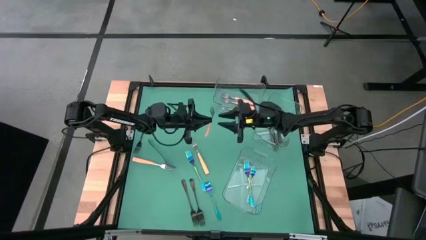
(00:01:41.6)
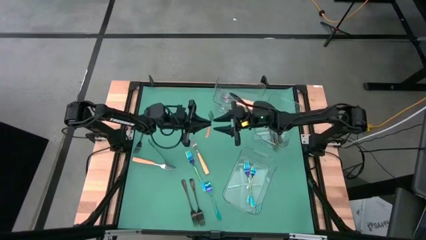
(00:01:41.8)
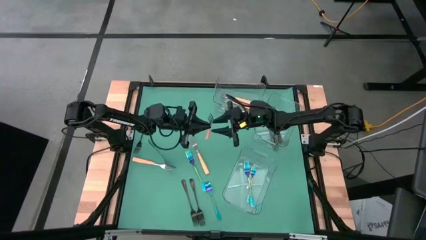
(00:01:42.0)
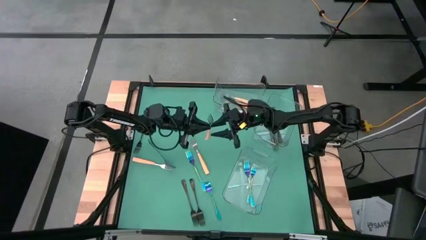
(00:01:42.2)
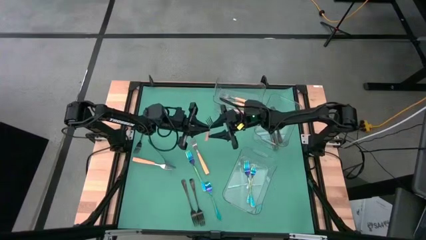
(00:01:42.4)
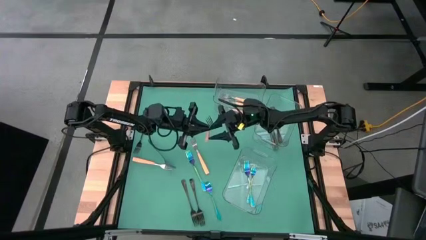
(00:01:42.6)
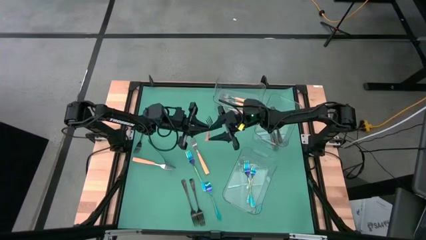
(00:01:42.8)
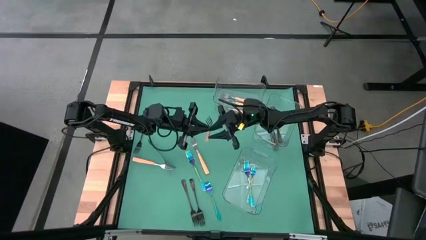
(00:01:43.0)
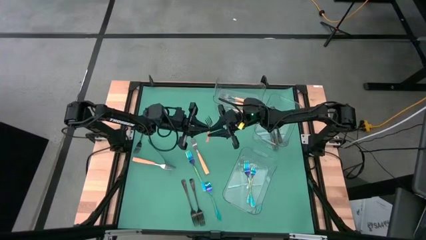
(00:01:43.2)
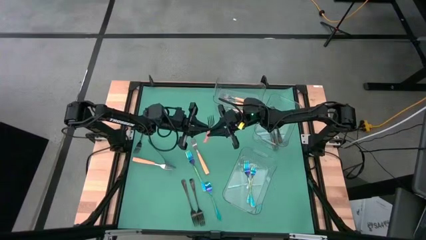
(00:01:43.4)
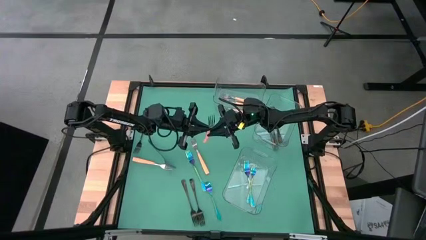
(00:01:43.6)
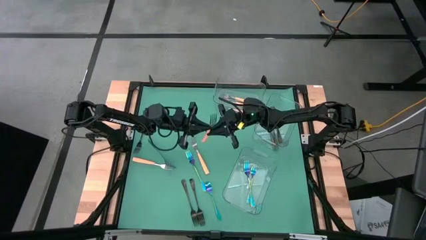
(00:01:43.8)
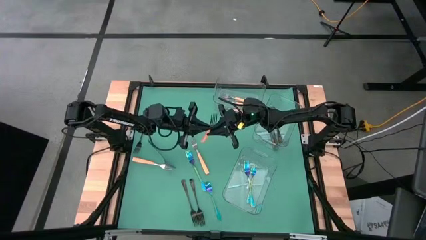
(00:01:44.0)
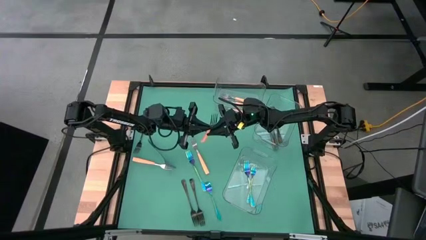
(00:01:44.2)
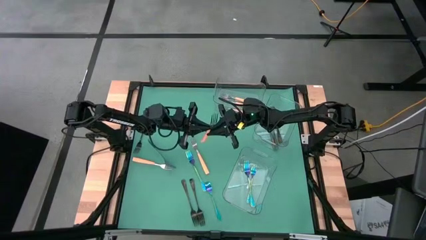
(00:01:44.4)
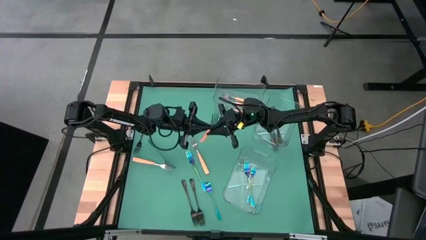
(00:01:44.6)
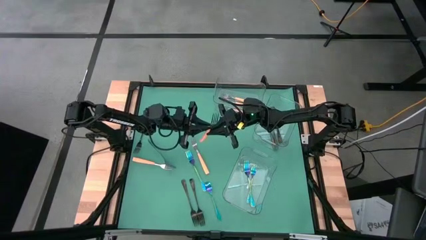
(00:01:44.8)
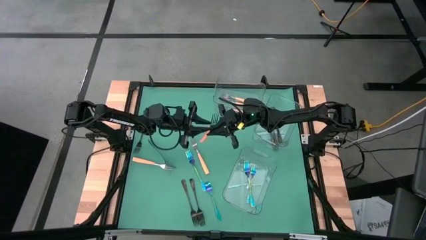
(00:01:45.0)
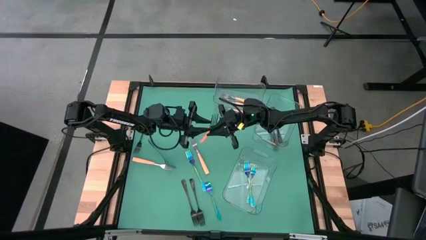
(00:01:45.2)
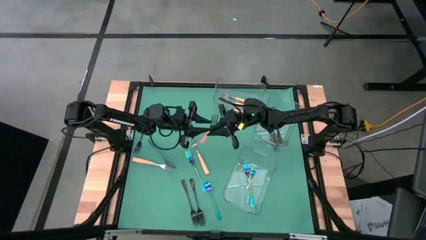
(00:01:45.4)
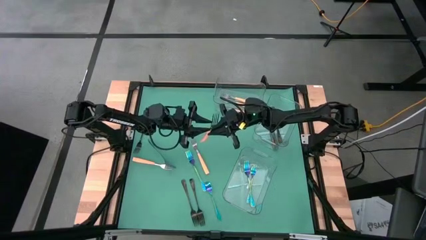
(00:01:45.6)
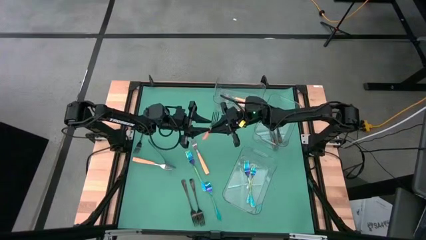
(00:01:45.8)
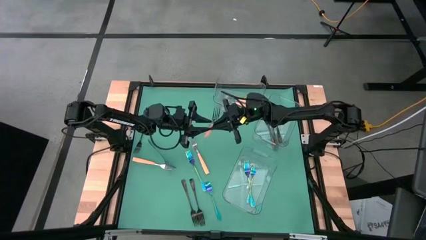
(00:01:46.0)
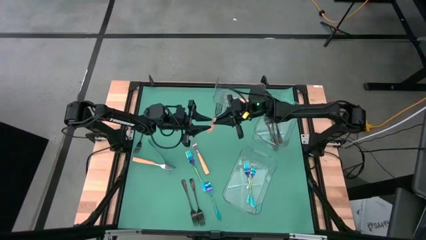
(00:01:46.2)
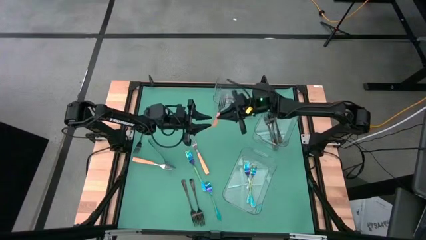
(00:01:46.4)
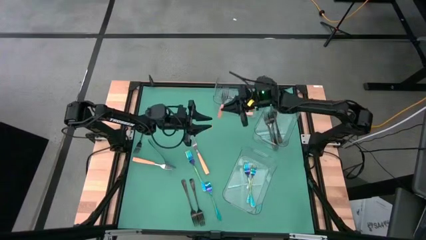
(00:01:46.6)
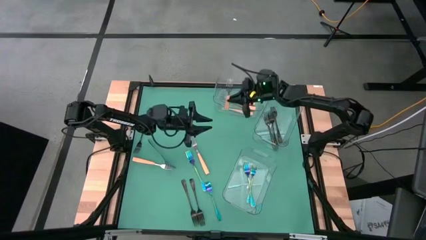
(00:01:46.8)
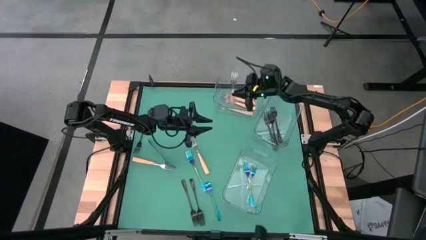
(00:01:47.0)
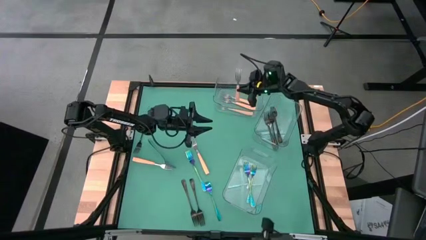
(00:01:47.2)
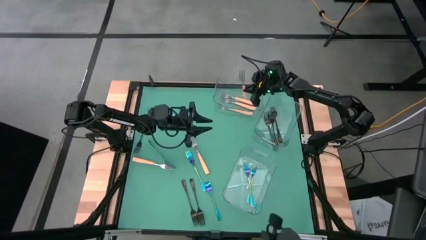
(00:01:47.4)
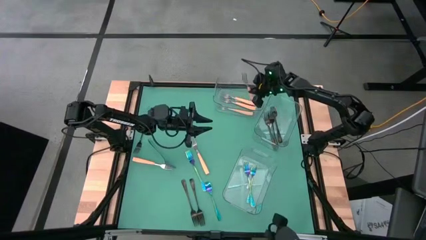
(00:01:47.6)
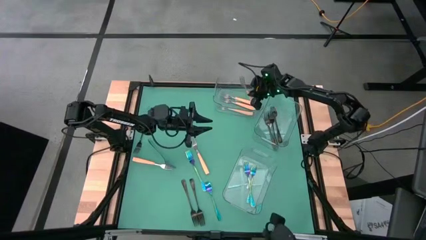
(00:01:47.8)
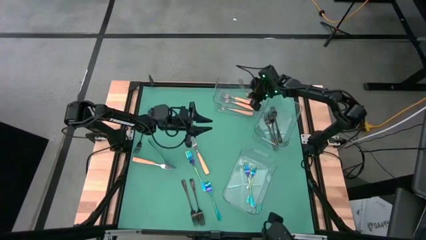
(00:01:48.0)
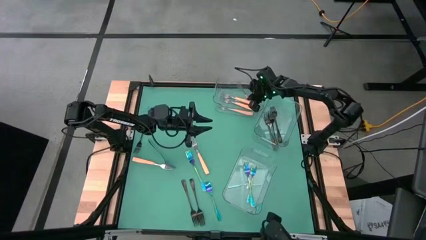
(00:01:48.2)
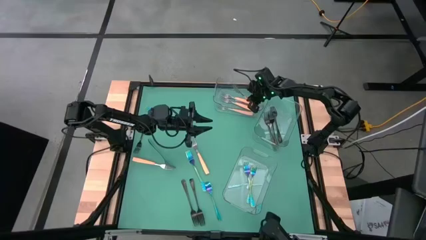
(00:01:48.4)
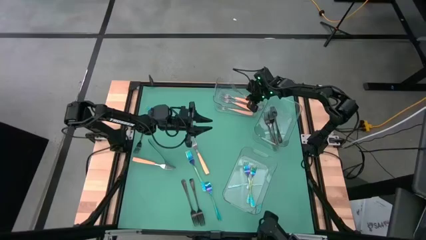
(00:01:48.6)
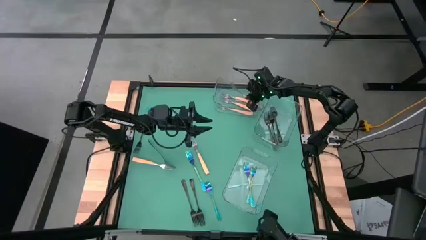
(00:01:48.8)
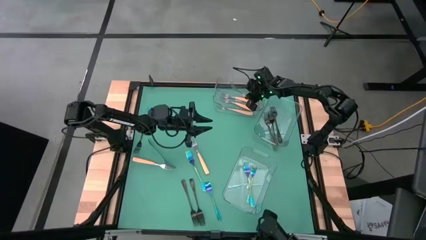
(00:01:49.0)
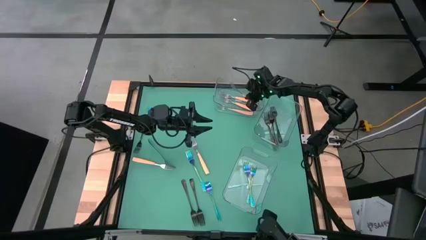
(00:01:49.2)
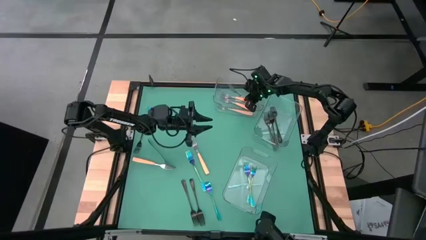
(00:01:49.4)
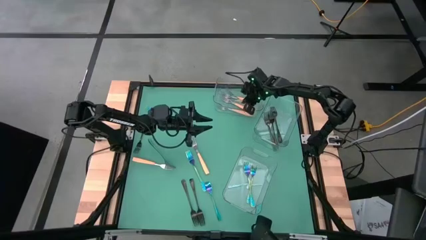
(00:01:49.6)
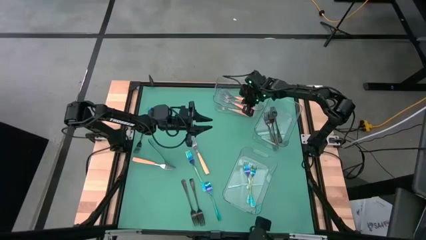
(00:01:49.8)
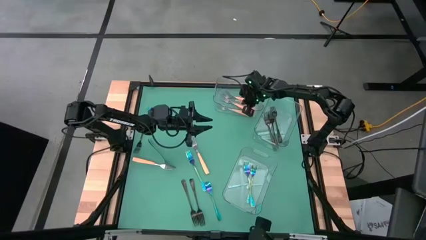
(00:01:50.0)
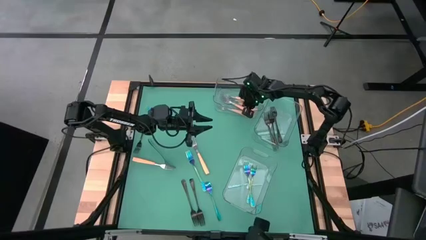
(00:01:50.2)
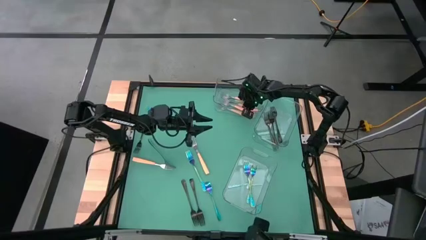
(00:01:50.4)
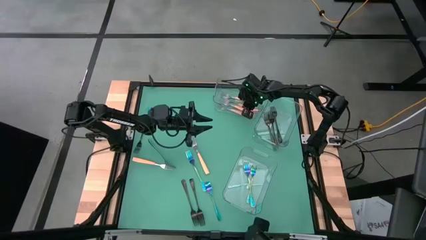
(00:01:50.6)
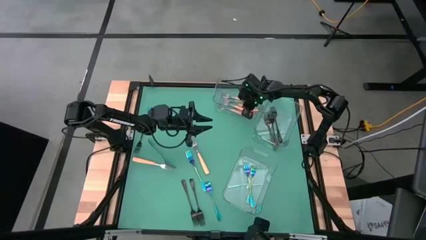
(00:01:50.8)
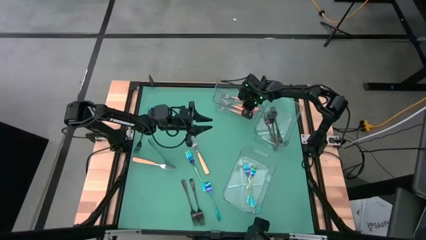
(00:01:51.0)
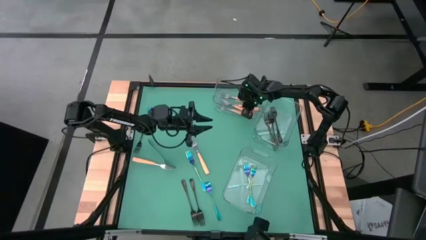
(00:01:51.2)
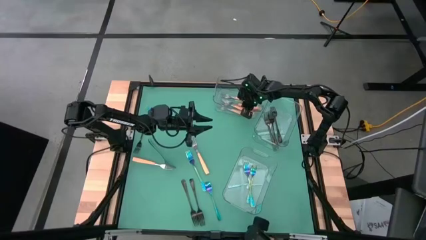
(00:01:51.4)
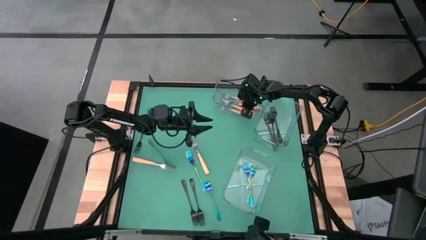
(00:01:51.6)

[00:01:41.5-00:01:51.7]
Task: Sort silverware by color (type)
Put the orange fork into the top transparent bin

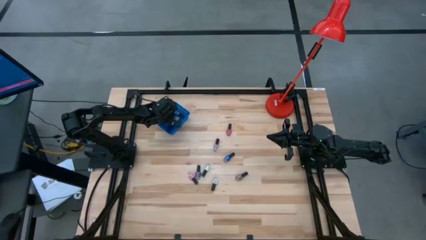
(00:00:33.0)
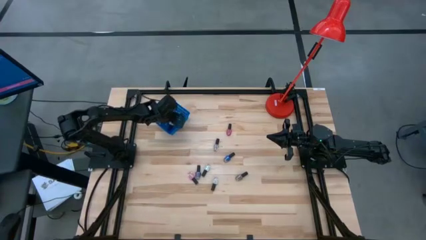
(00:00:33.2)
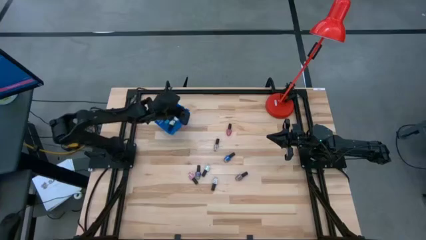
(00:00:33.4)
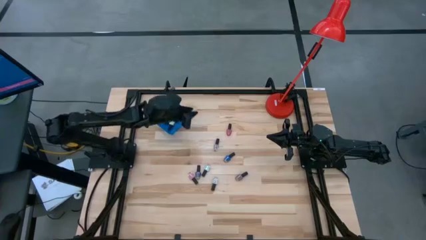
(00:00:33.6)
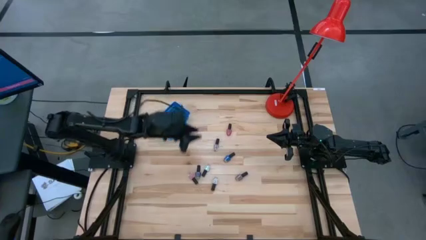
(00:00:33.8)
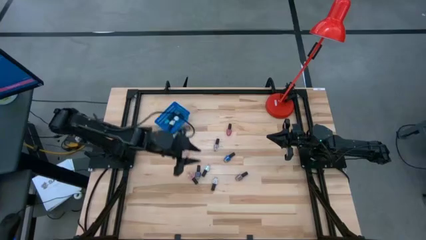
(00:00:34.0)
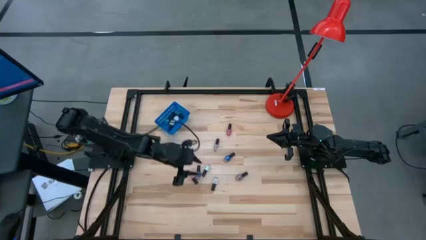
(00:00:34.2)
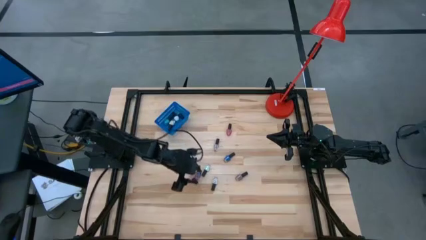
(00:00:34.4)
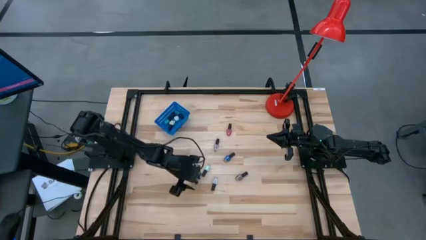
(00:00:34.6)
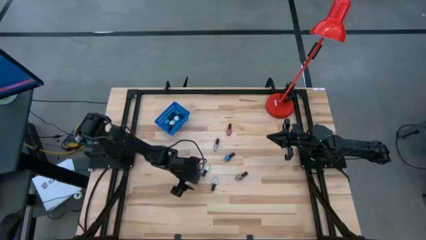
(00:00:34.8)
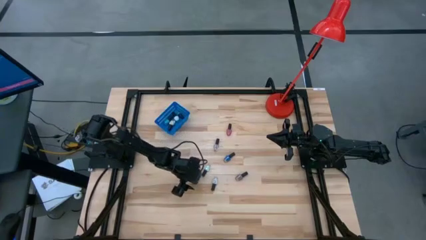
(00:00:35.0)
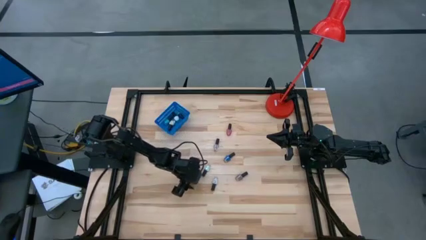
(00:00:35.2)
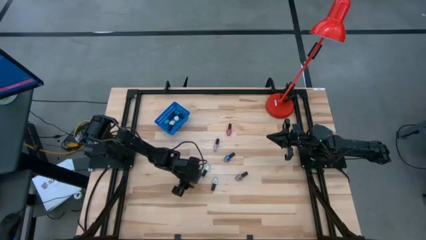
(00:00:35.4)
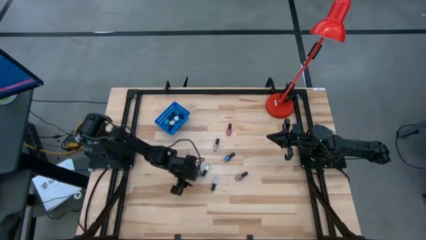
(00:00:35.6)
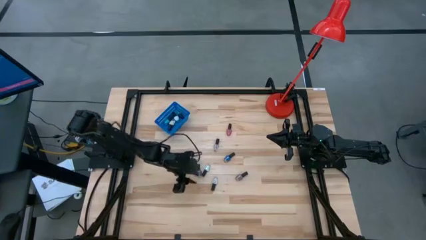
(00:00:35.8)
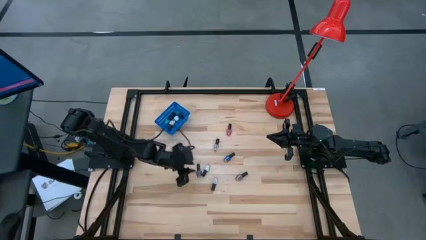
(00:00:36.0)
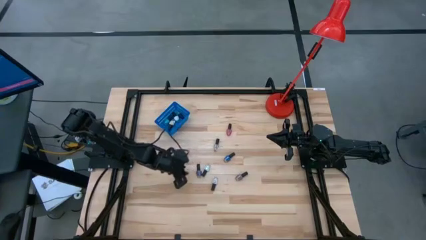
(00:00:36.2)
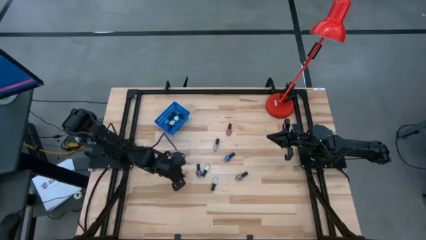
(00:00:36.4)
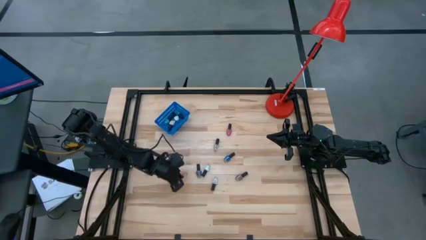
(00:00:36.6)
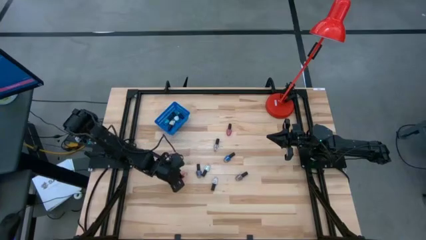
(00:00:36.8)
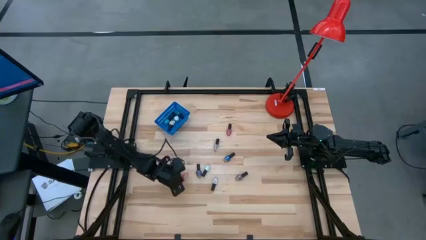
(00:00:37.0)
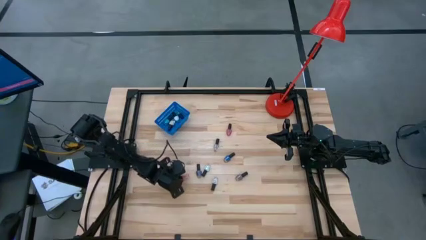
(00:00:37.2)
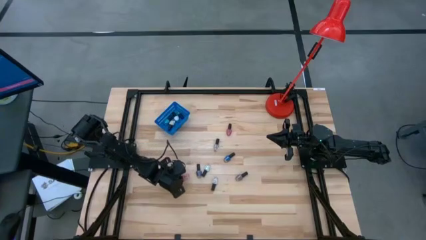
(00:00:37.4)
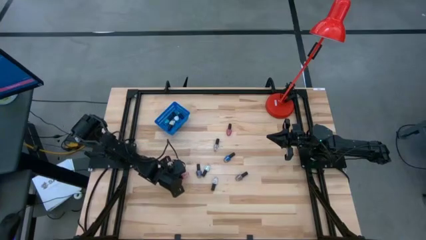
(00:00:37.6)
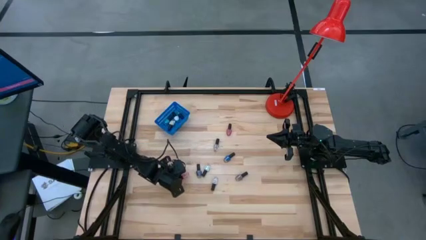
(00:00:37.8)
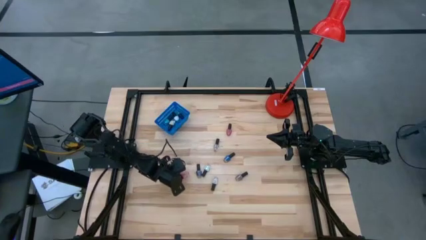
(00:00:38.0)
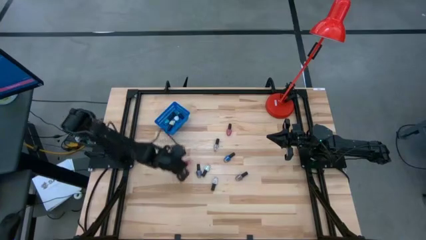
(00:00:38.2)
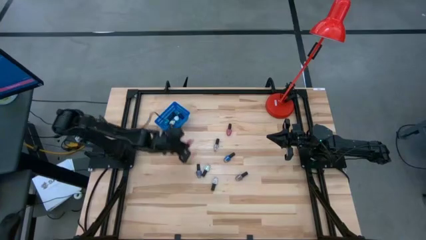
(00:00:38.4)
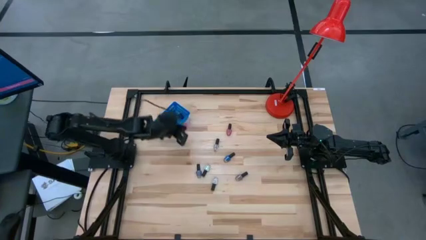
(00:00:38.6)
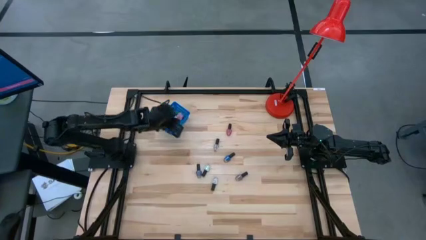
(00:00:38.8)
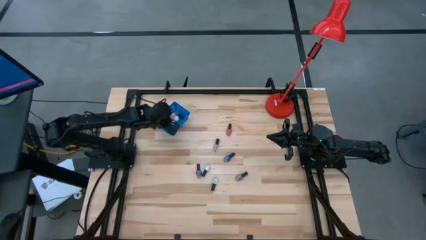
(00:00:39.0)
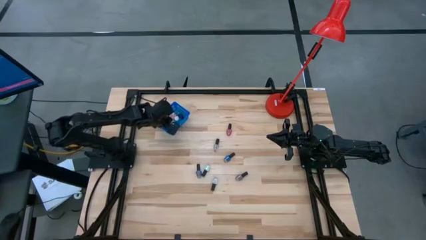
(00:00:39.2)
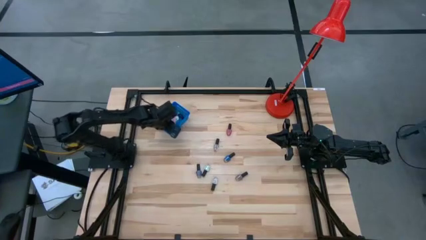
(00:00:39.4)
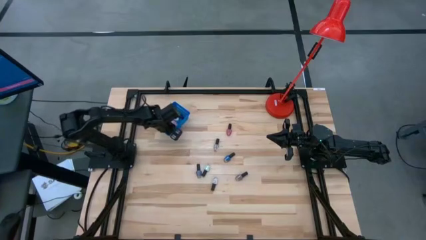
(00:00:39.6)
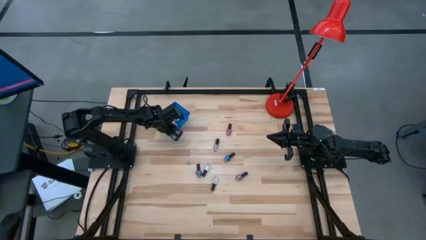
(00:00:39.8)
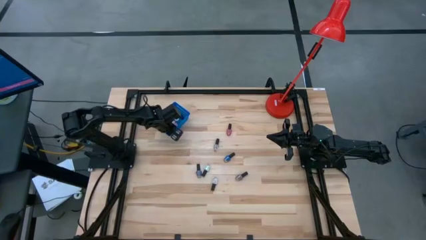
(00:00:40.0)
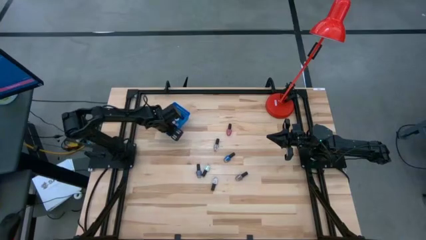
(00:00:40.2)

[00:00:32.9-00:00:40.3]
Task: Pick & Place Nail Polish
Put the pink nail polish bottle into the blue bin
